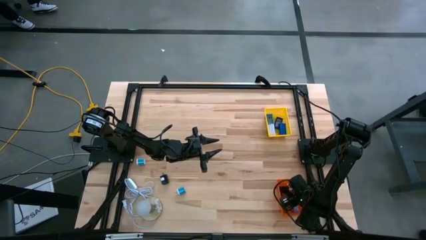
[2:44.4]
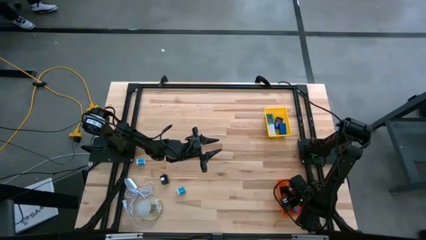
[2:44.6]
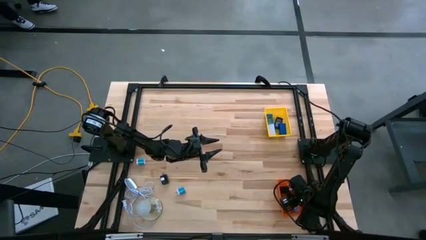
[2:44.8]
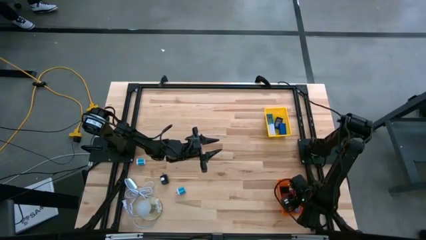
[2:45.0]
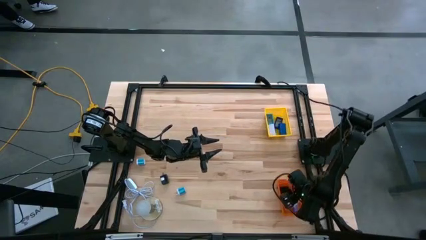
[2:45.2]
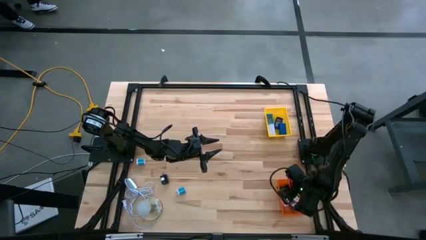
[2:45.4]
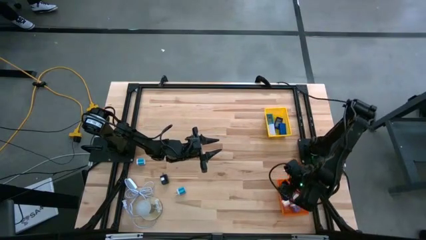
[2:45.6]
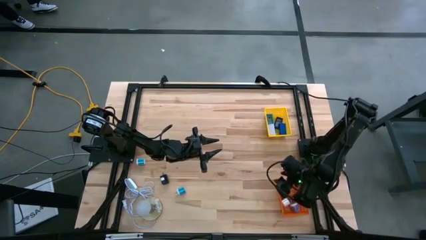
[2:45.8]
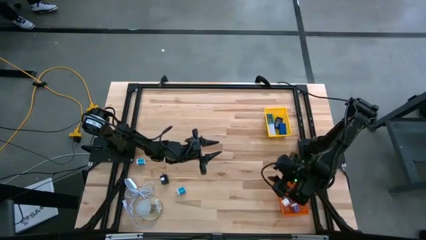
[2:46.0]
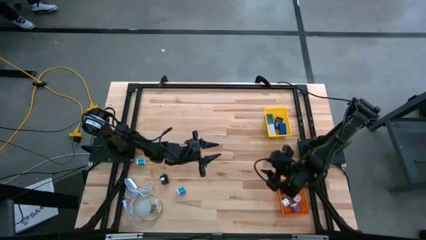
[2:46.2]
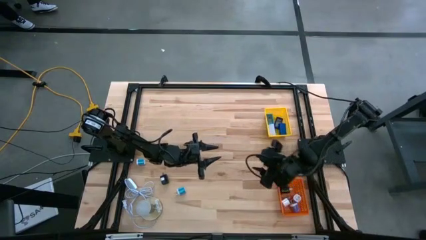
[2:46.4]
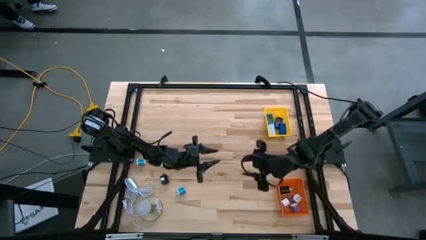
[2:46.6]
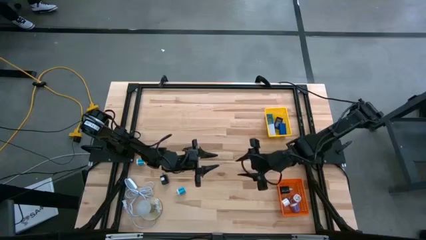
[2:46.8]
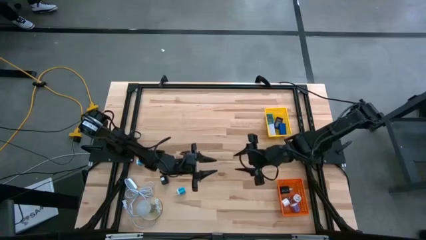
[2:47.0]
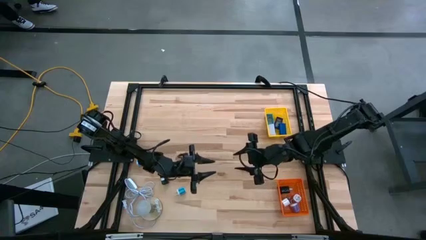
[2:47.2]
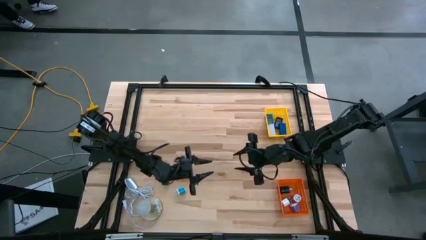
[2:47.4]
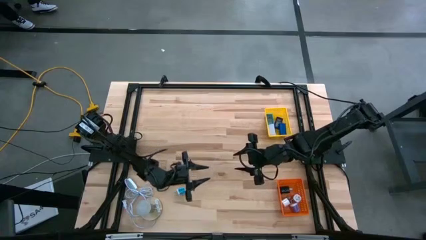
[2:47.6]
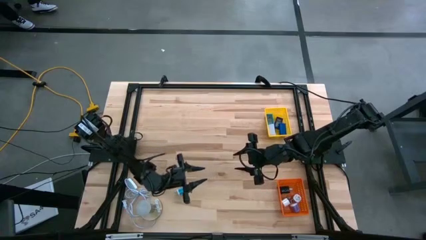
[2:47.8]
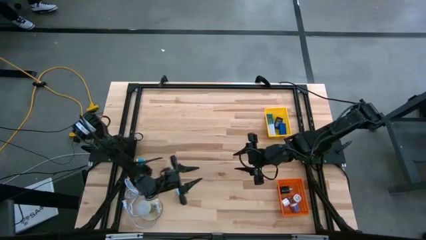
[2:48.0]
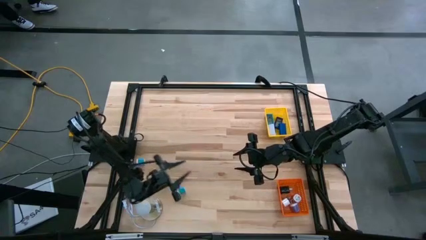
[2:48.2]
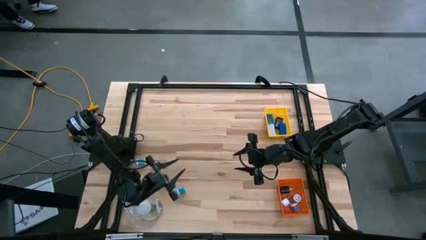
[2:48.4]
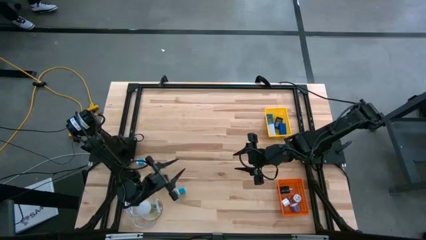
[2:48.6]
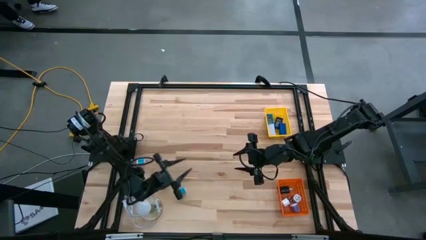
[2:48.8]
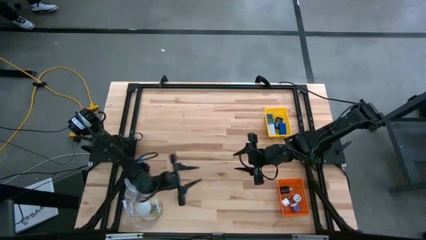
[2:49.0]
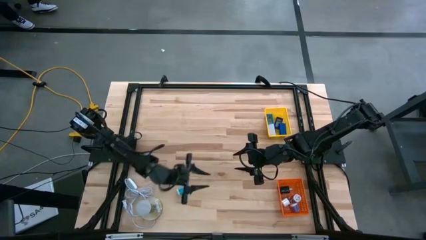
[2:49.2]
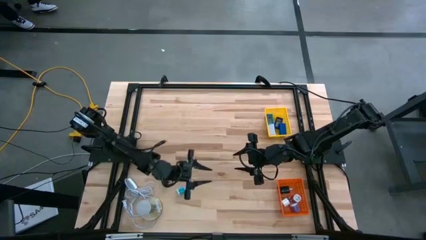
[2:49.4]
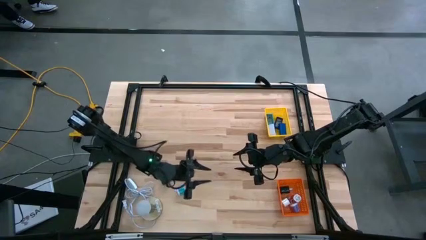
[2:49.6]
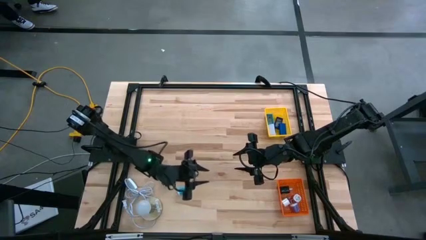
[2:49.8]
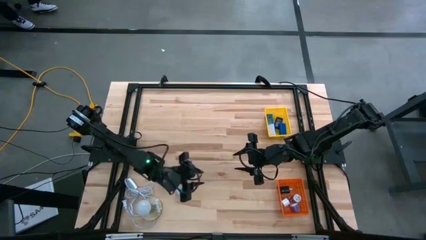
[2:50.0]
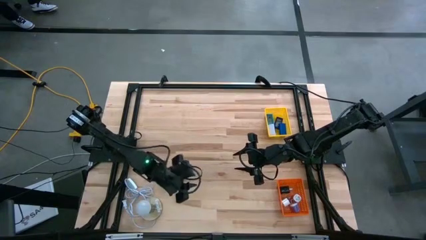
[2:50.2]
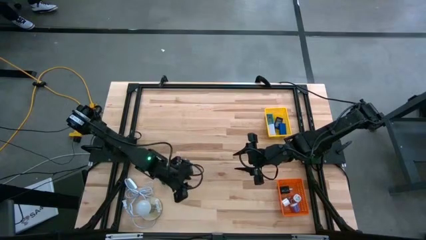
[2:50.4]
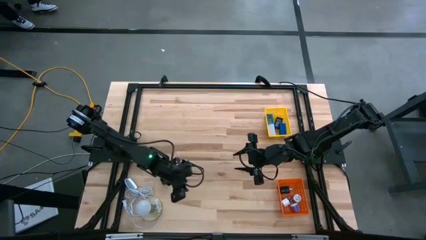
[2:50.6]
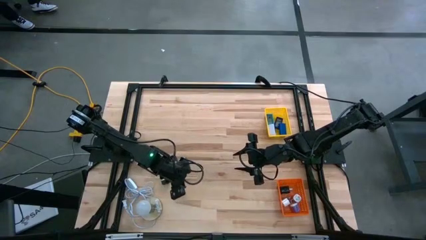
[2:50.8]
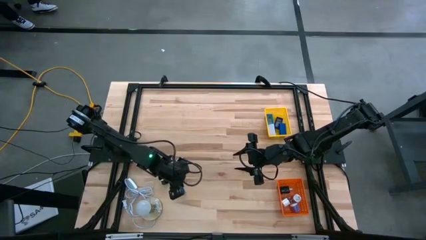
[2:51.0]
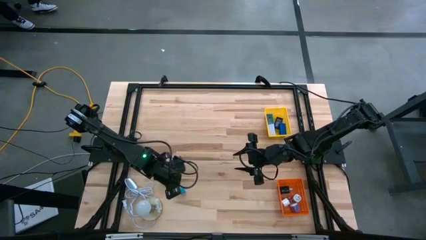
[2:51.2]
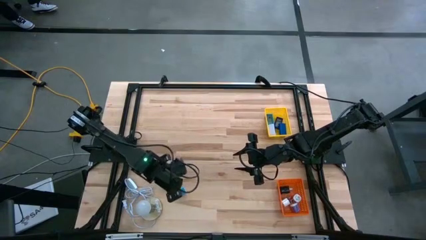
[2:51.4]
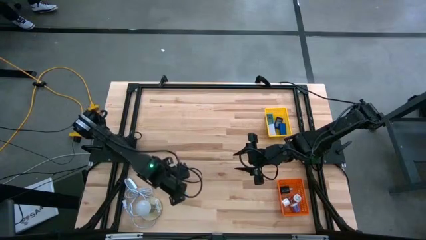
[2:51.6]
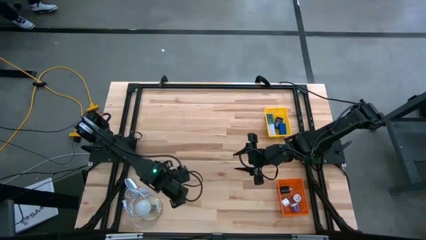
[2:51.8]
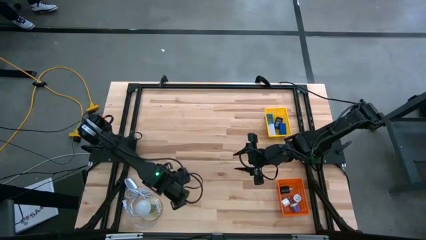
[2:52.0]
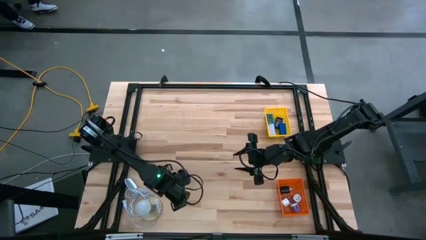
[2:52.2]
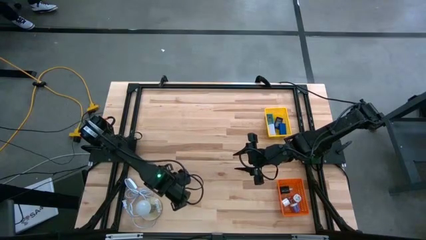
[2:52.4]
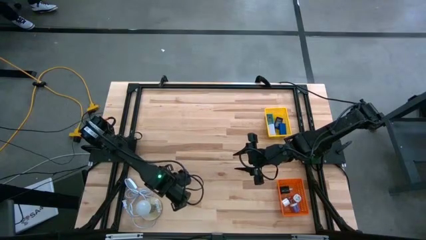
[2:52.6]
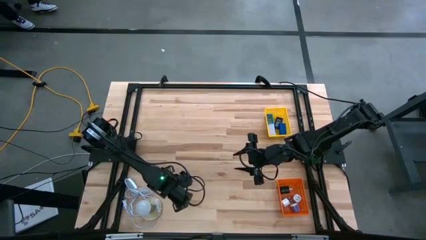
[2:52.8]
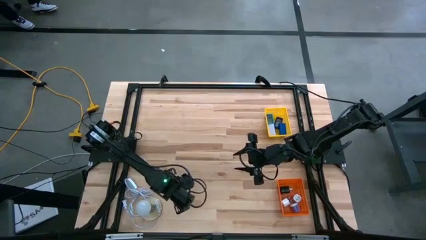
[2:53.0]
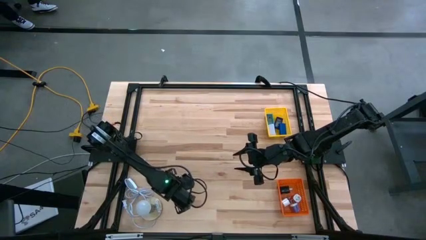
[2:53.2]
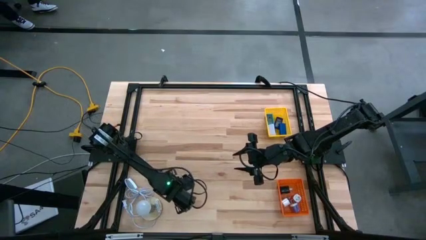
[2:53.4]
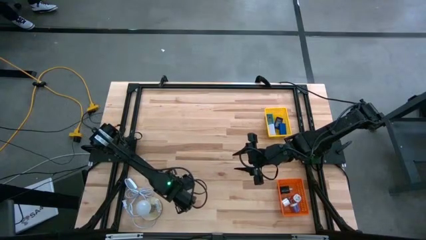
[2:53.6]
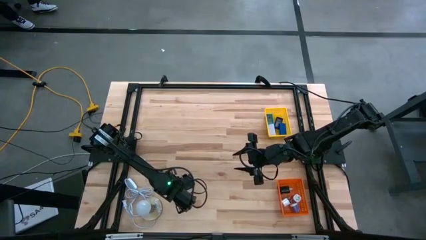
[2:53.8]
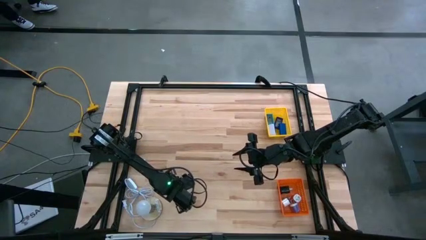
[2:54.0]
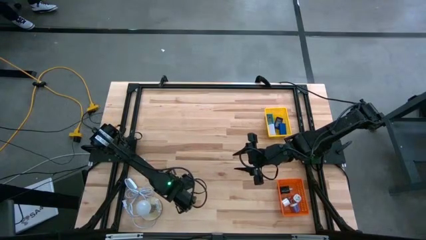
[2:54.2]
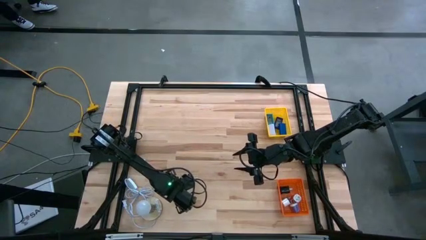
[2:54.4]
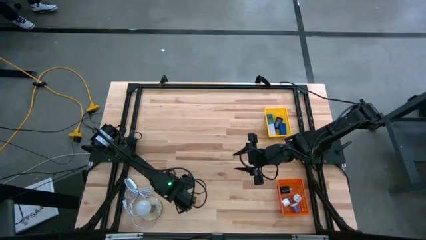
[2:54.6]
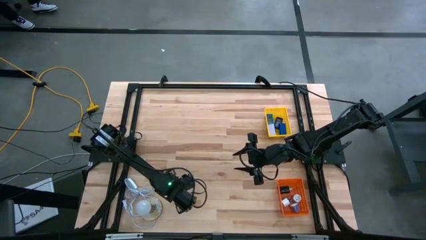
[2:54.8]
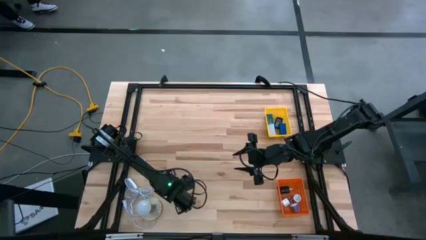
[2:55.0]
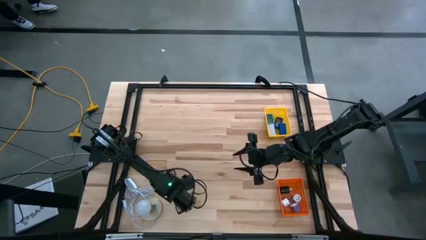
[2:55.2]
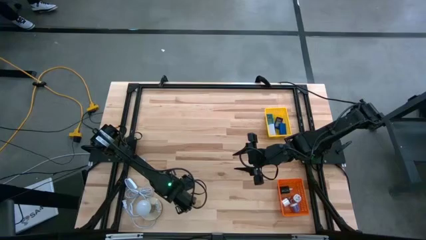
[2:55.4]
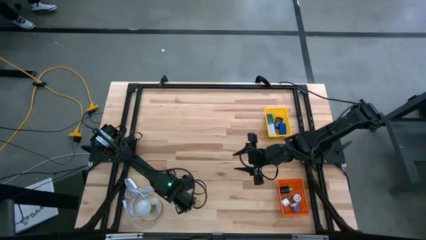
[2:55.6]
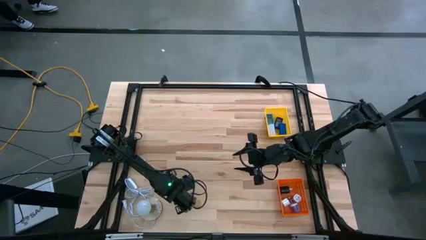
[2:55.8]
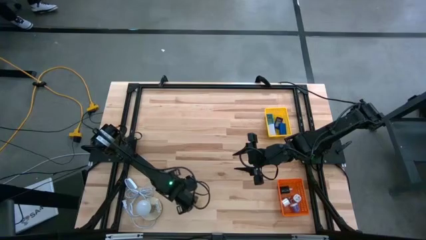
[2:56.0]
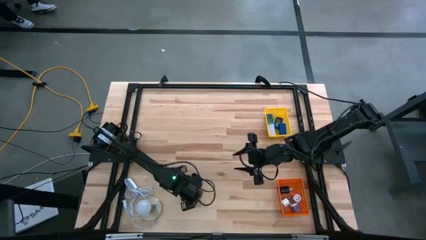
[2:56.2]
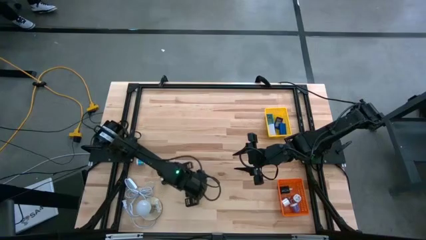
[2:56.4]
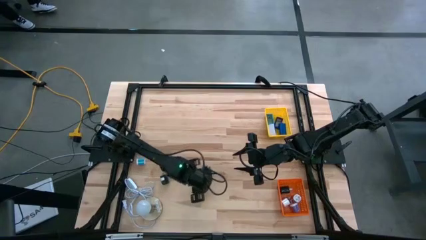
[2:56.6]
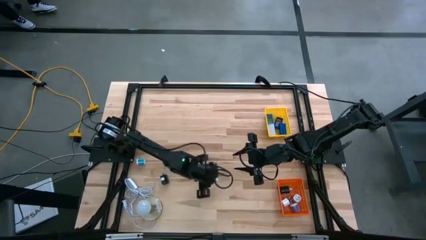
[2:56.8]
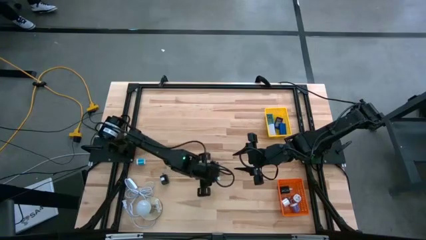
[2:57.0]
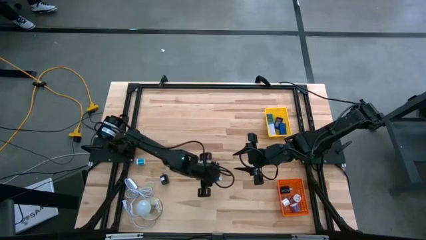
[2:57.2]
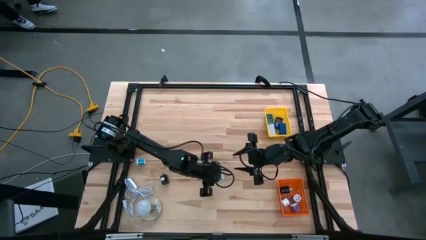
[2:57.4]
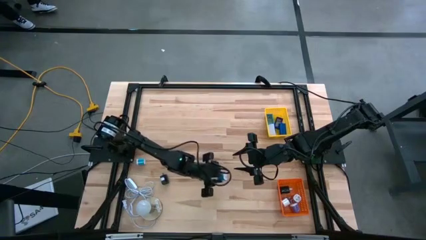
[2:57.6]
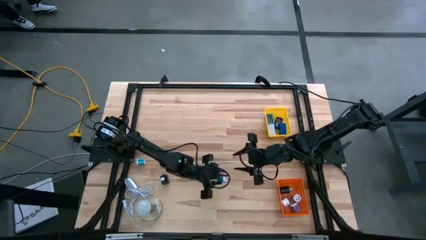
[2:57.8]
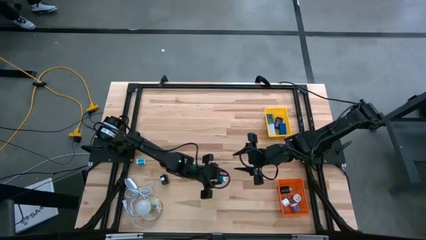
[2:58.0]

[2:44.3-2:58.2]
Task: Pick & Place Office items
Put the right light blue charger adapter into the orange bin

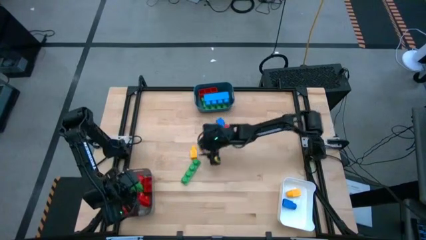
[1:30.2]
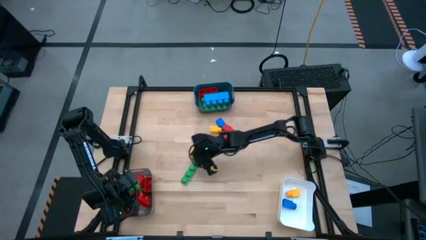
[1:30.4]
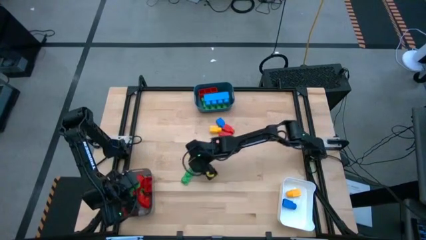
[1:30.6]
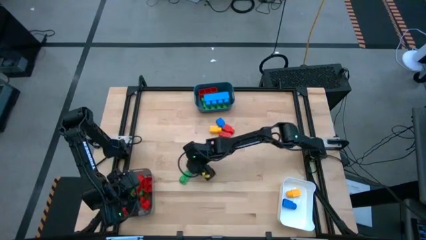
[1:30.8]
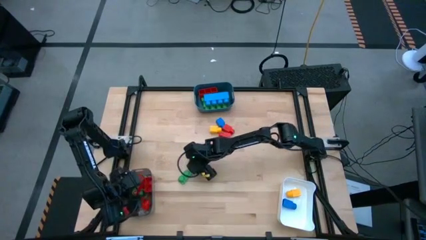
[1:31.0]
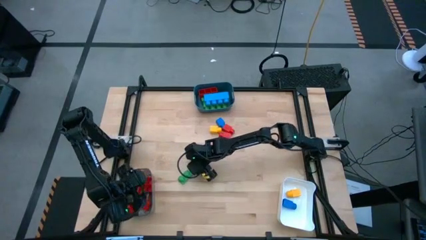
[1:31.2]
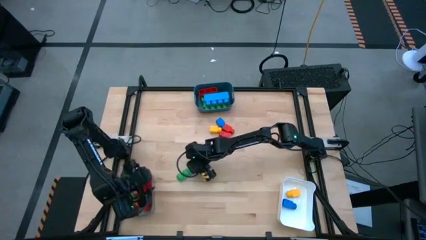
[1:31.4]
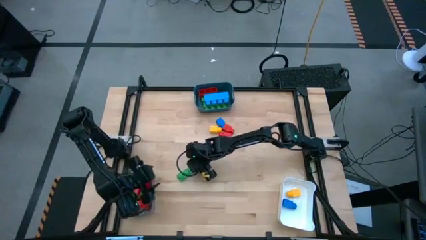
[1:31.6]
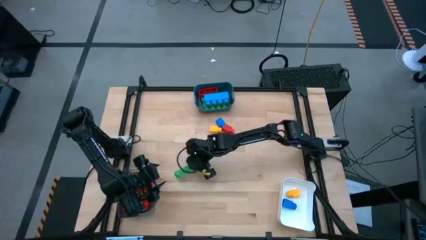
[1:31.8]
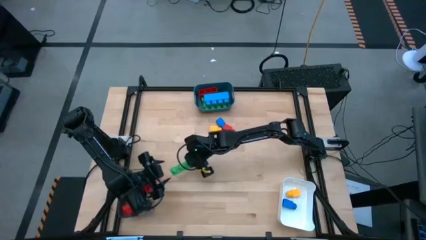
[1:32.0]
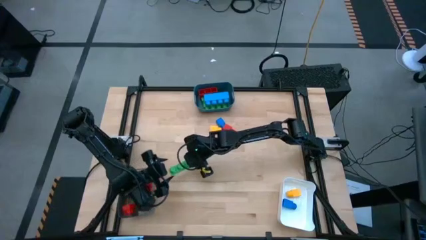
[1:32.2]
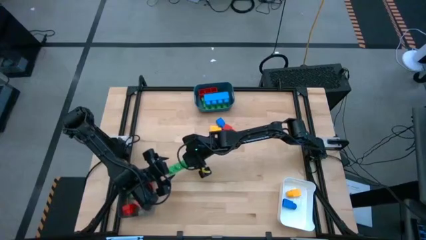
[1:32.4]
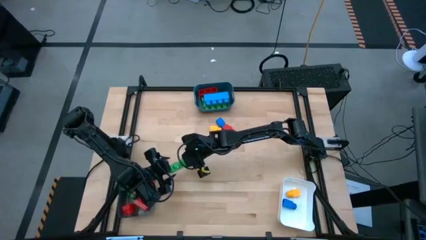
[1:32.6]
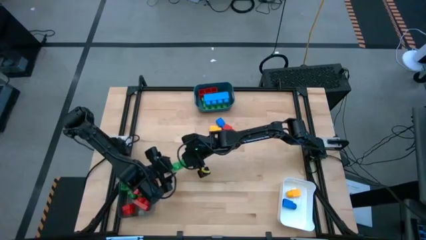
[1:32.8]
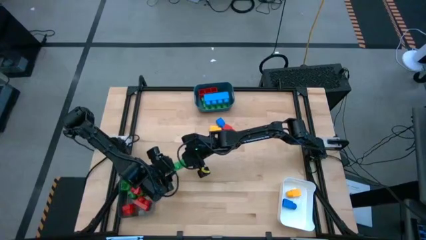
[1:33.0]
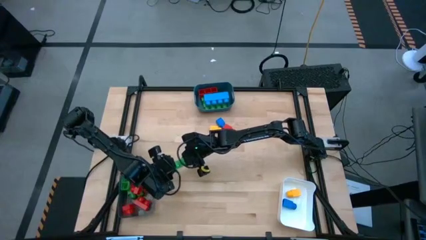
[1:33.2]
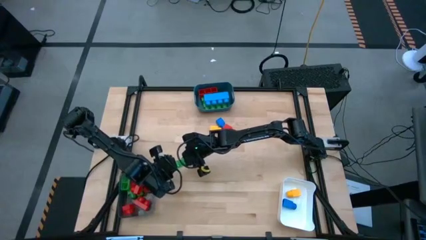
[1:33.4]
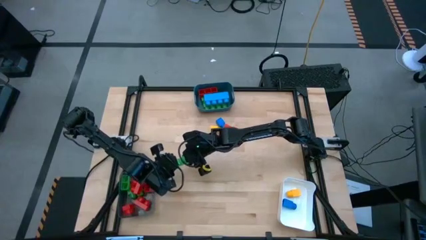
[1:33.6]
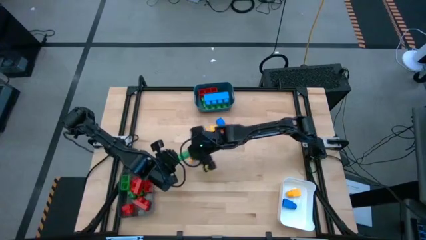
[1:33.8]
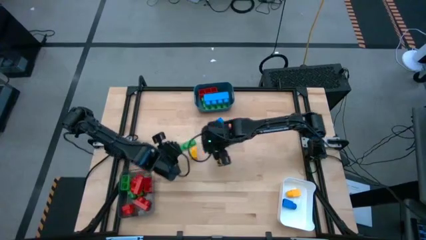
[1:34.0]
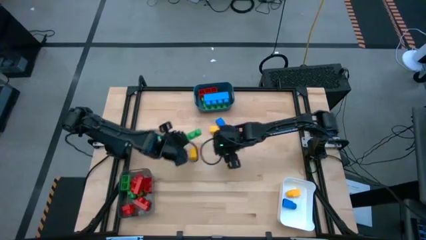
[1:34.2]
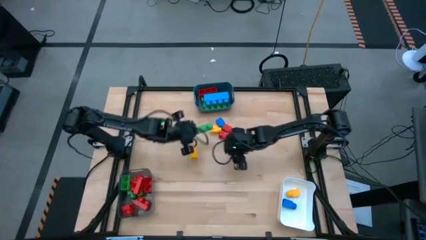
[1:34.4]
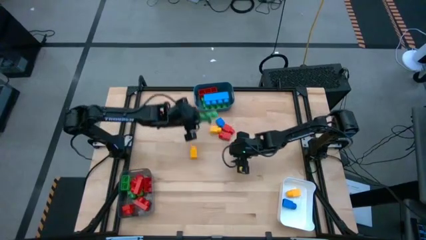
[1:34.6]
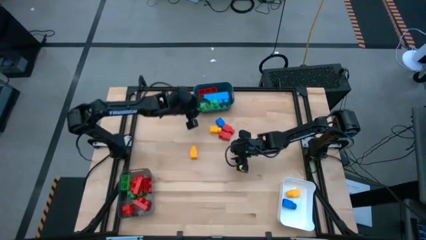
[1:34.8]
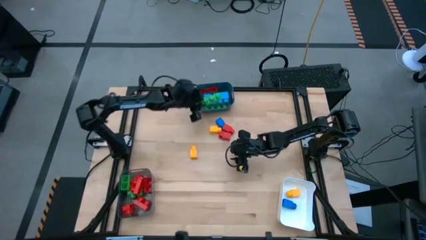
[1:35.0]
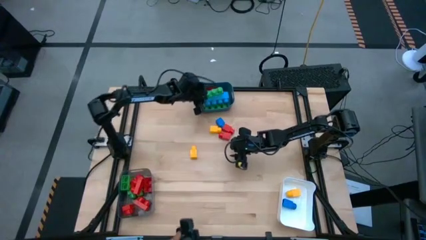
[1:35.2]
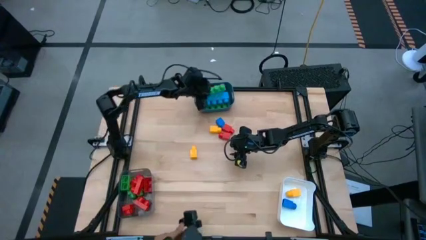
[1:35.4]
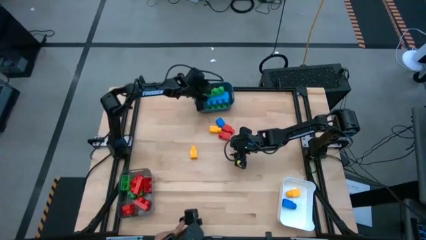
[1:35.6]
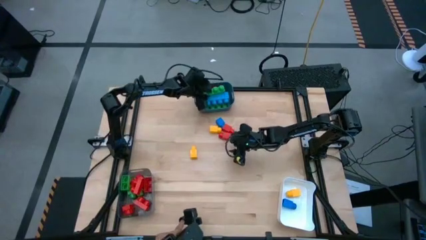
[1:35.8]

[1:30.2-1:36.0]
Task: Sort blocks by size
Put the green game piece into the blue container
